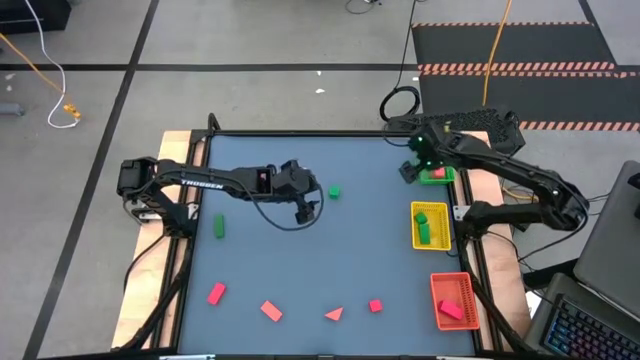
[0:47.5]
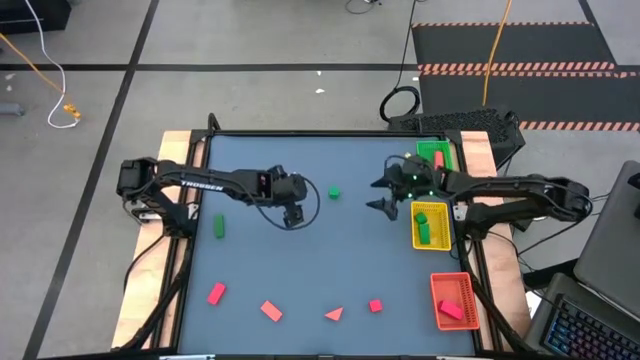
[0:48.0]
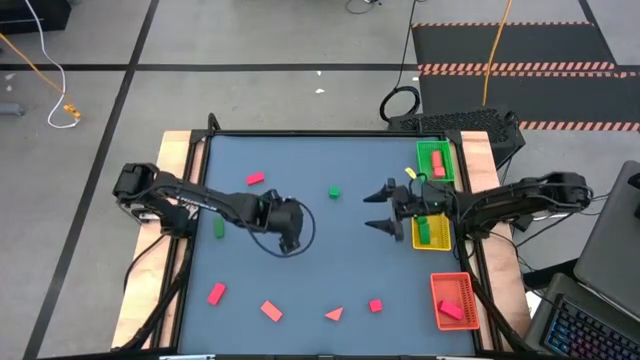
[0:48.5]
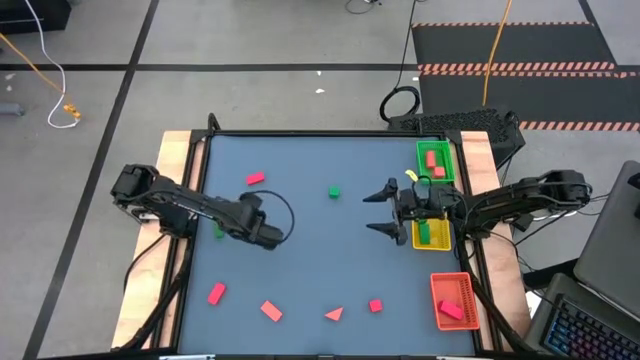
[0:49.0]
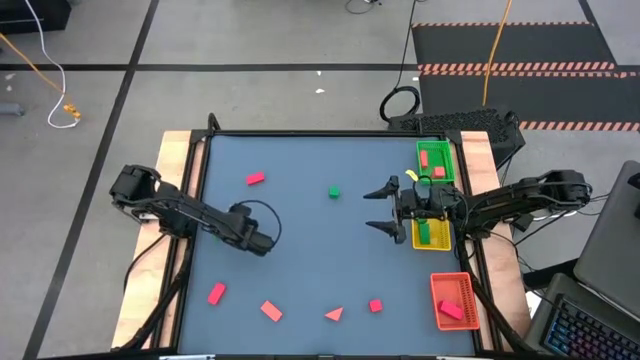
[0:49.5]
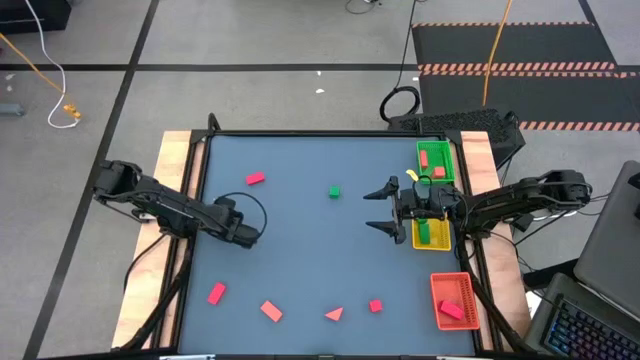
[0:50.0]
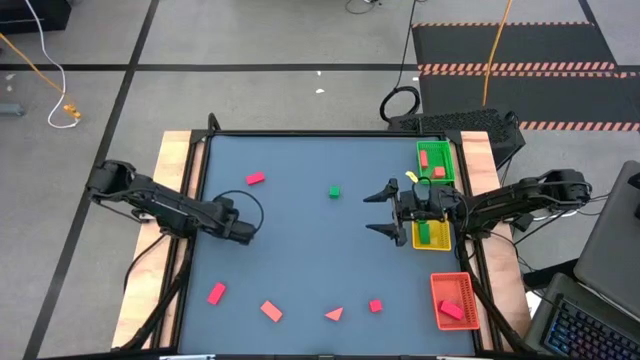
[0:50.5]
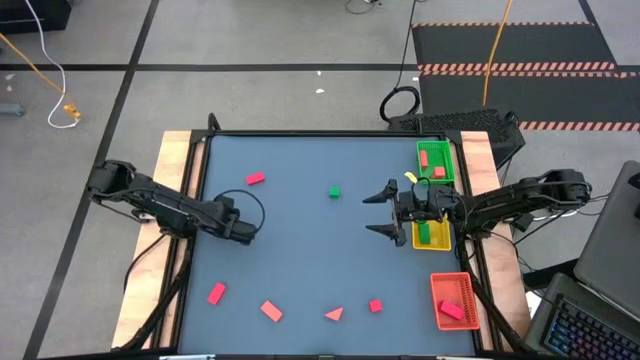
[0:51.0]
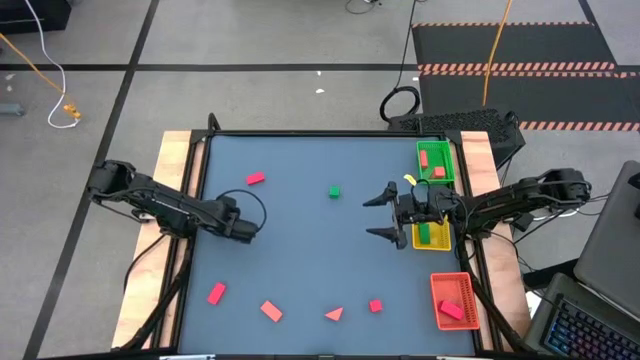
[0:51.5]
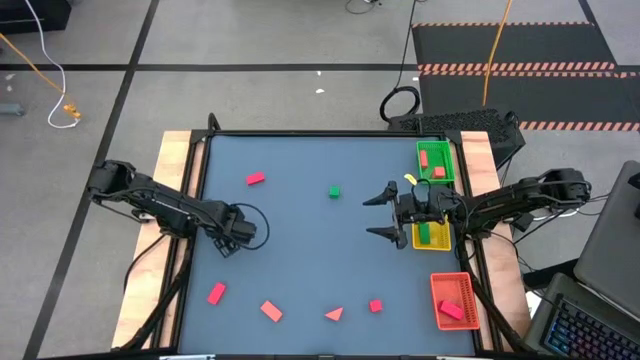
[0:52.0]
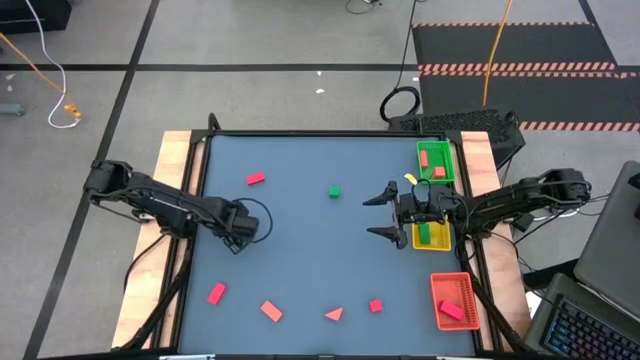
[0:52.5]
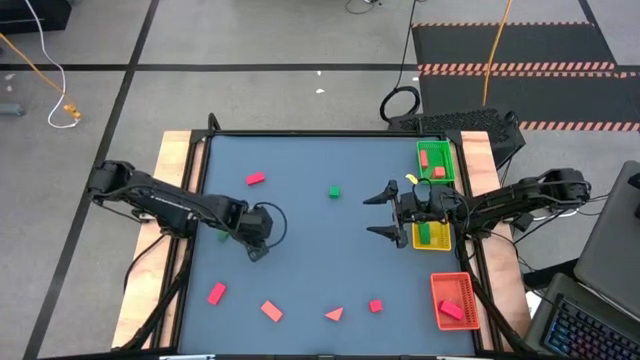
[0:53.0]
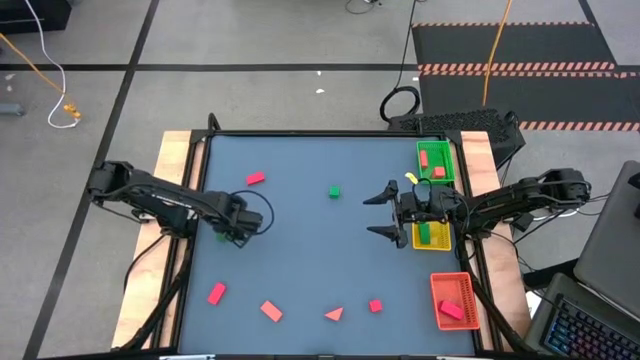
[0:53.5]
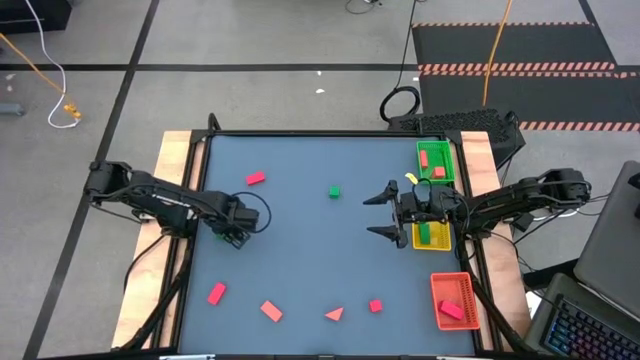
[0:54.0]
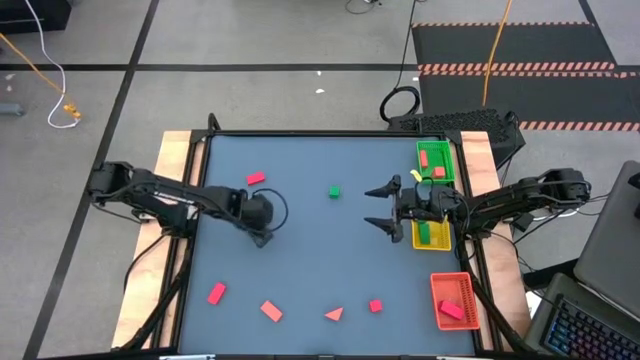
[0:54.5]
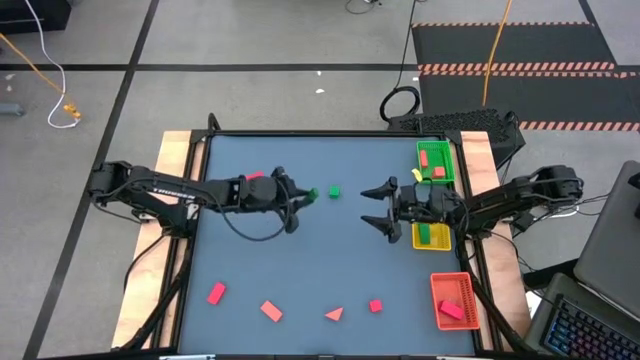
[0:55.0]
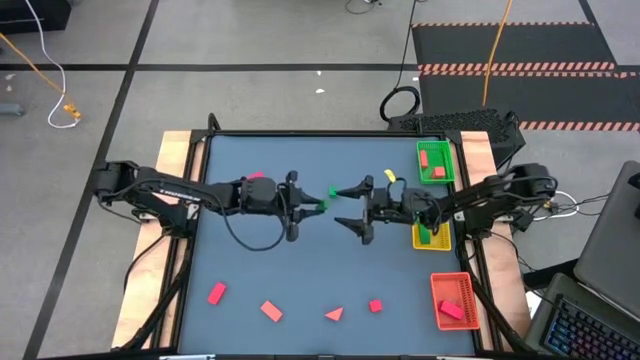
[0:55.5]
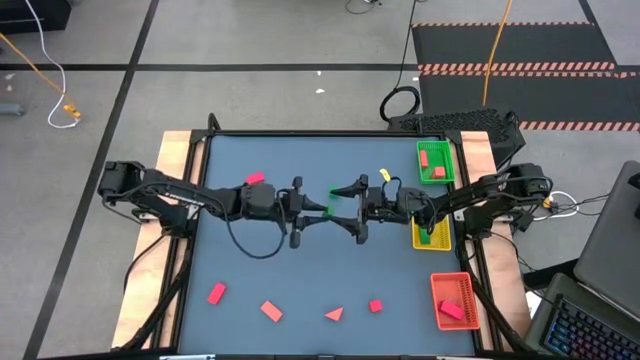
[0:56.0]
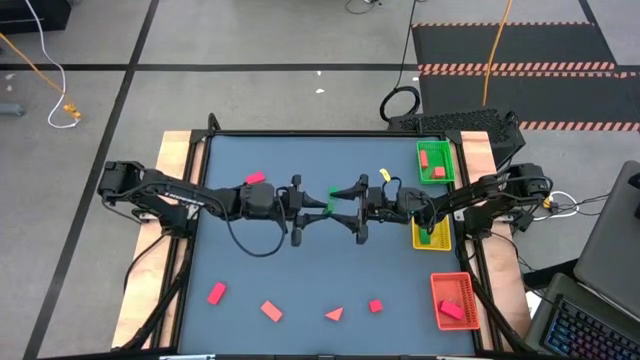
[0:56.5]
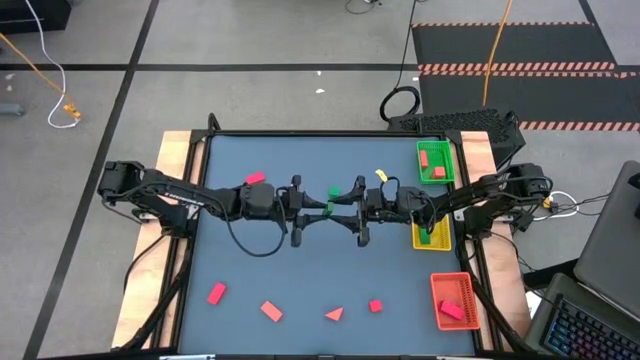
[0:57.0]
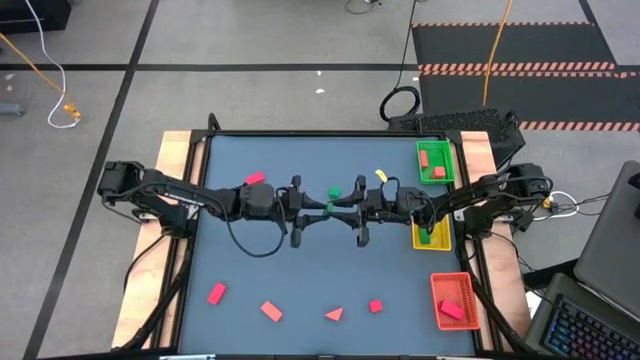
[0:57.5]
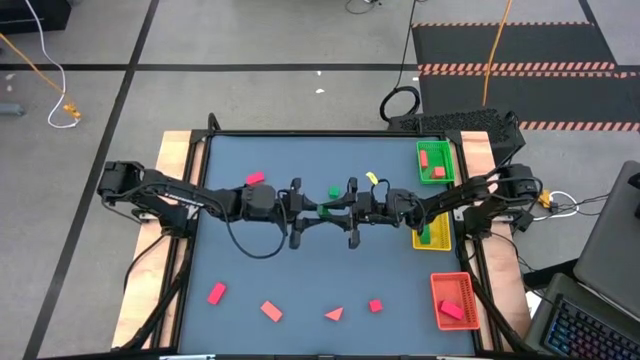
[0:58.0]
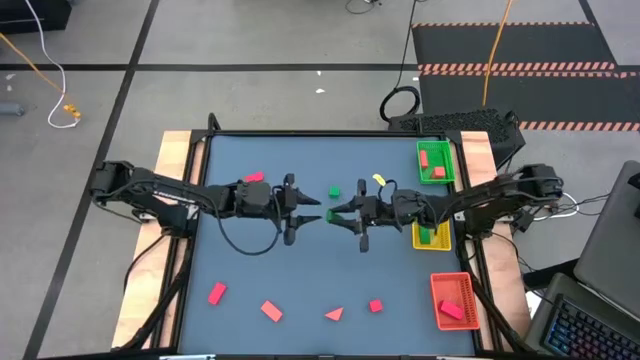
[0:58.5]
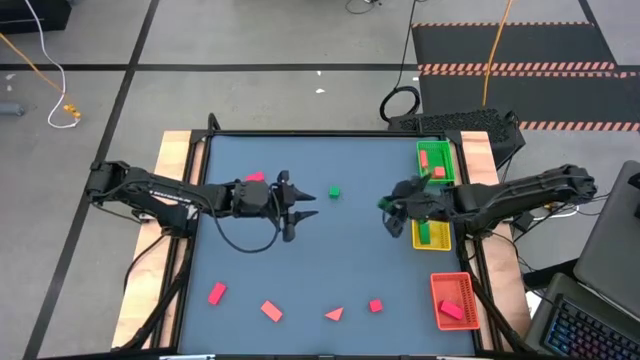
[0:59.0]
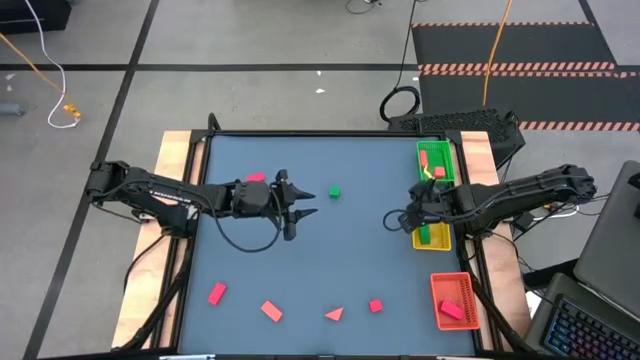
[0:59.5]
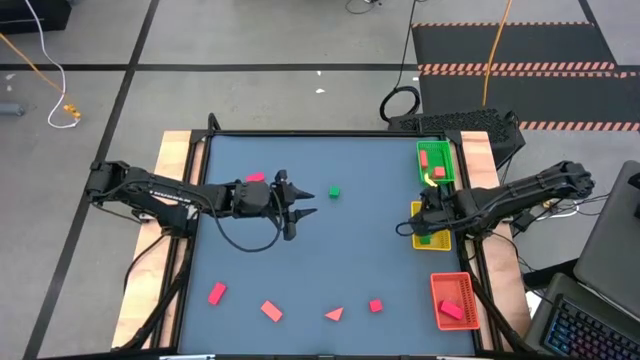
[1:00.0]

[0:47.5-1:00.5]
Task: Sort & place blocks by color
Put the left green block into the yellow basket

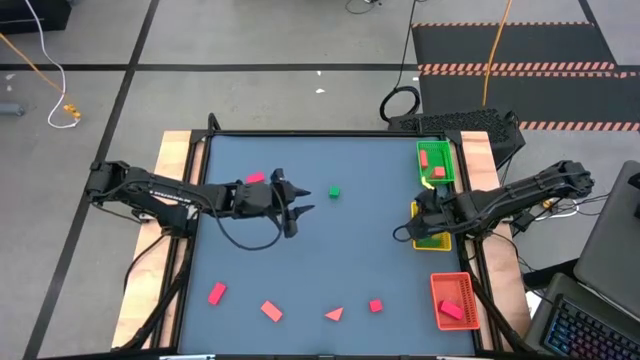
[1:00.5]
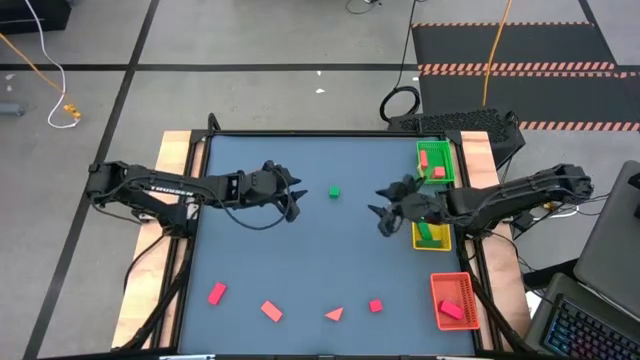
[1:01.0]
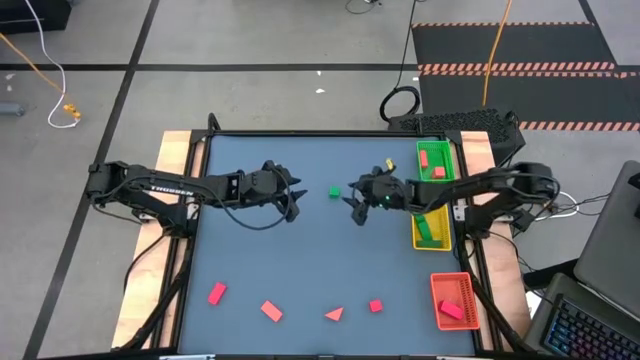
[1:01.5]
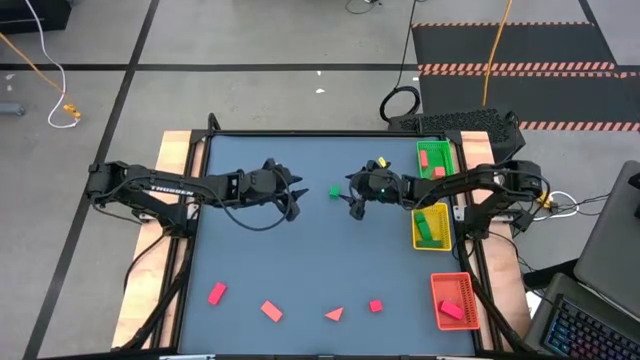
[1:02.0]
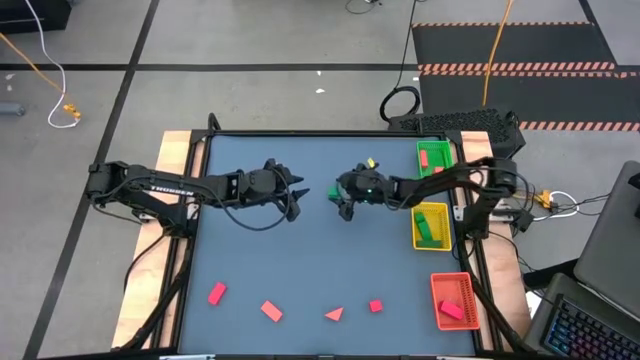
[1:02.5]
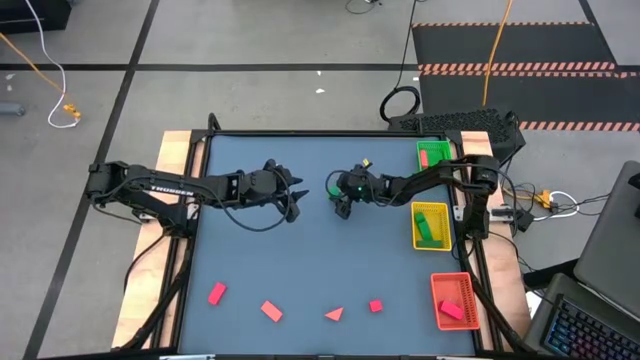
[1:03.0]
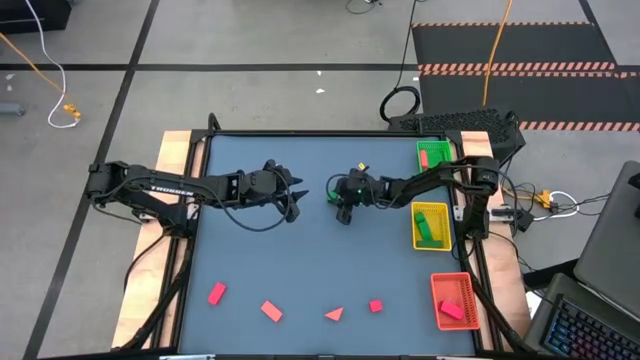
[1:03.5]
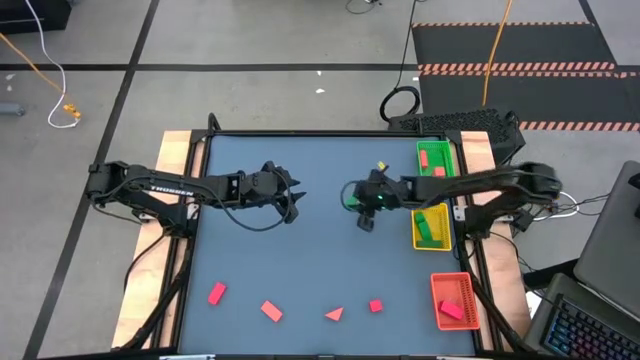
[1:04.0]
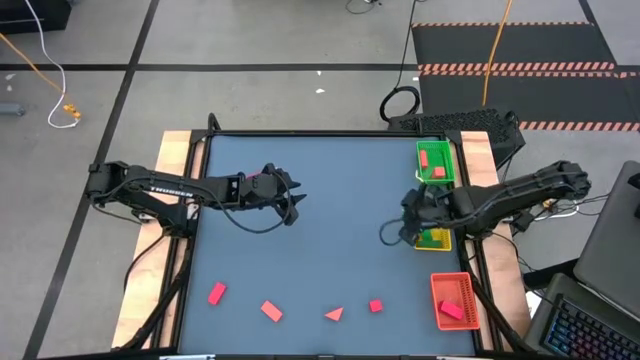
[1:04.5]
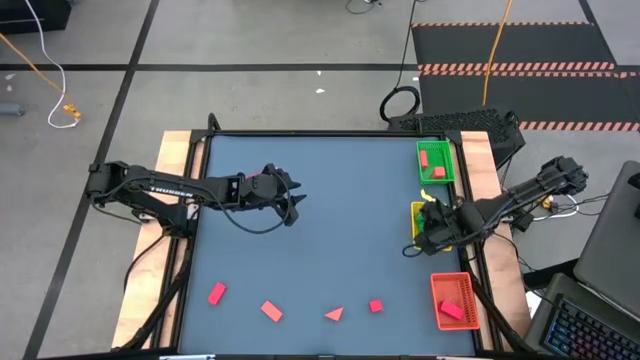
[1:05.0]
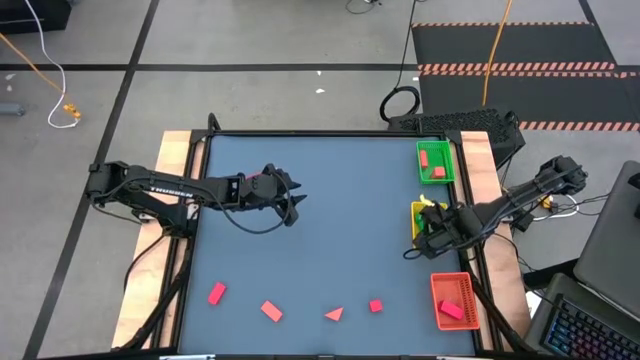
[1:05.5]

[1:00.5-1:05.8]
Put the green block into the yellow basket

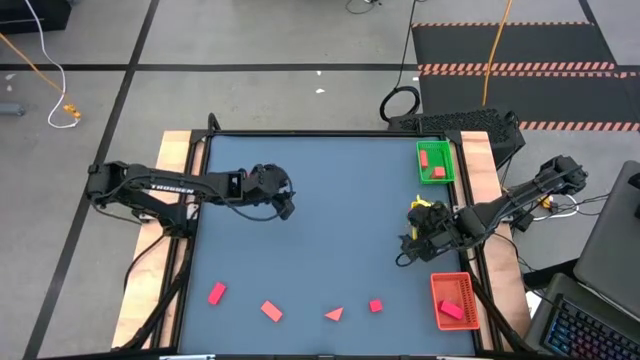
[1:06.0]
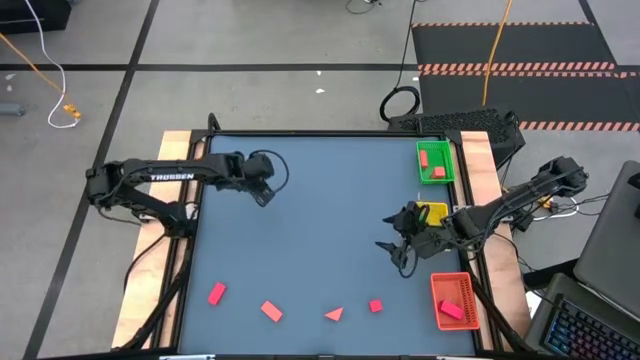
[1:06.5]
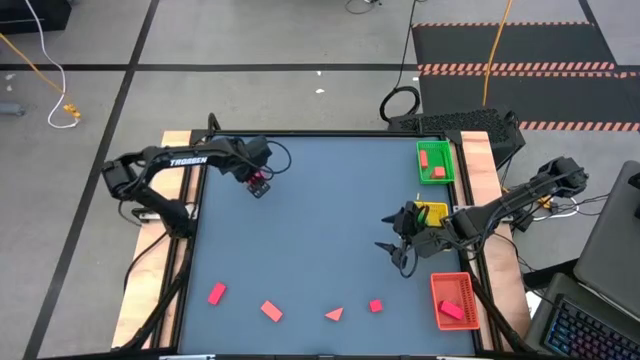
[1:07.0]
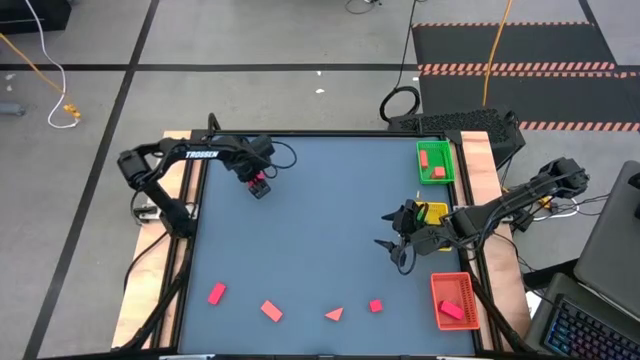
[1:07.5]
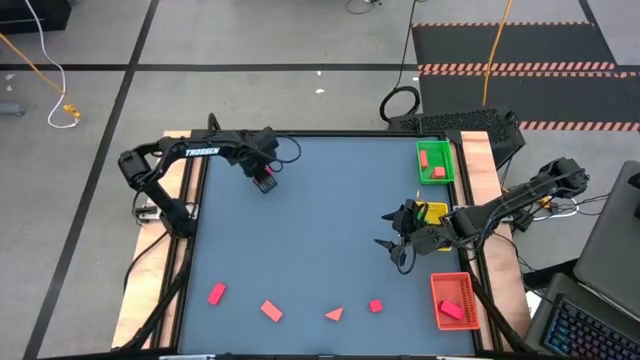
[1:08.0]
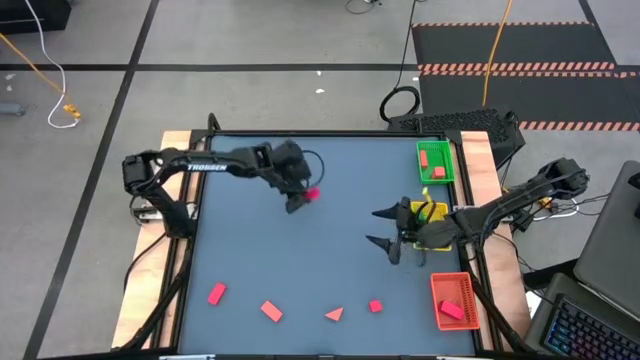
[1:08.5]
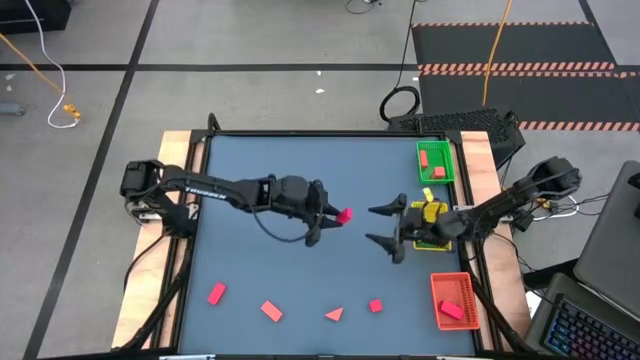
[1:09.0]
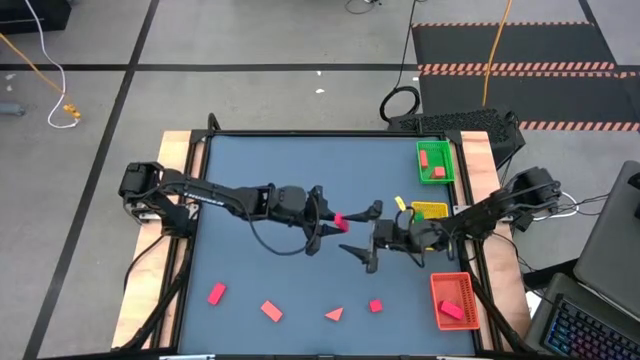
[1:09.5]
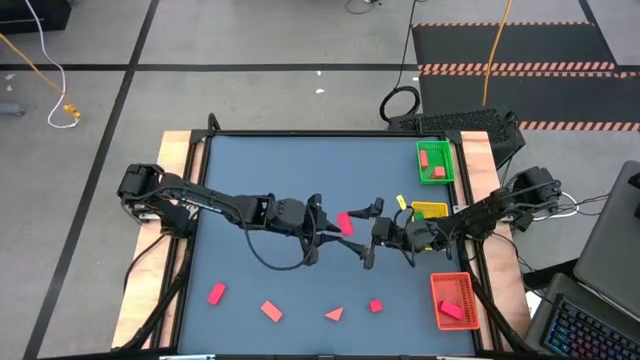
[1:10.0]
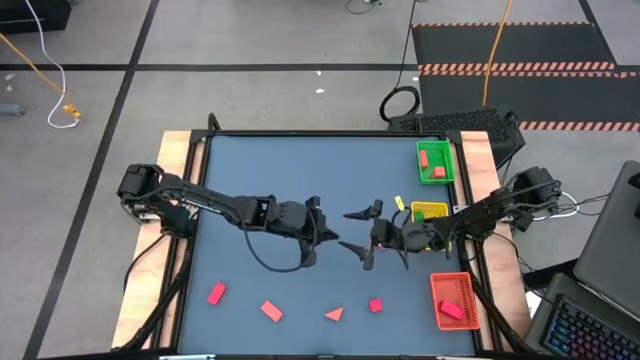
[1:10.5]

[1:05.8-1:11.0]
Put the top left red block into the orange basket
